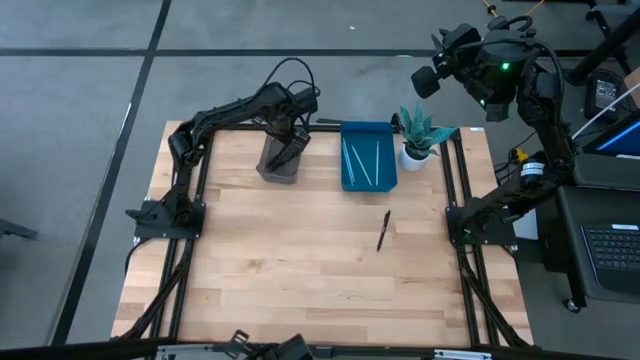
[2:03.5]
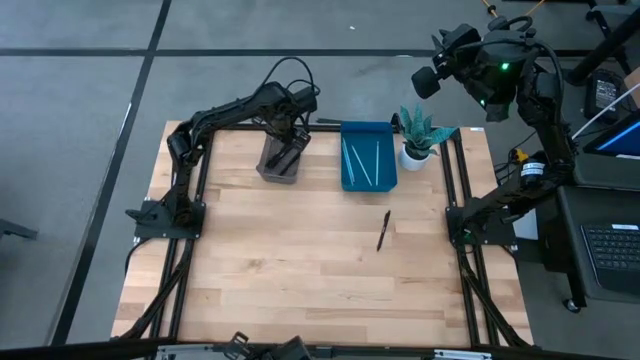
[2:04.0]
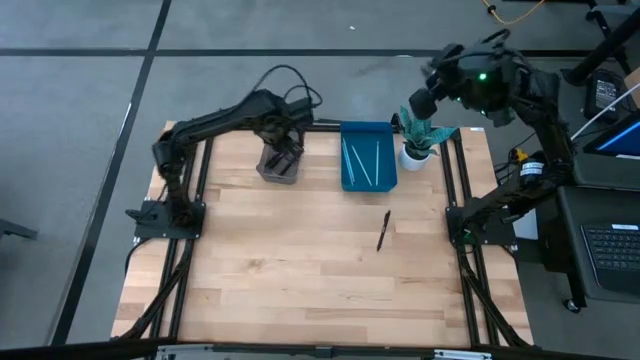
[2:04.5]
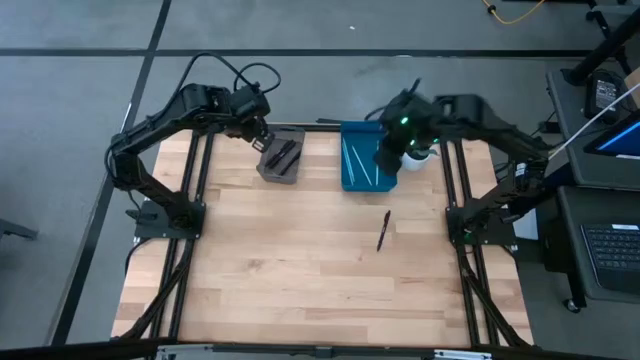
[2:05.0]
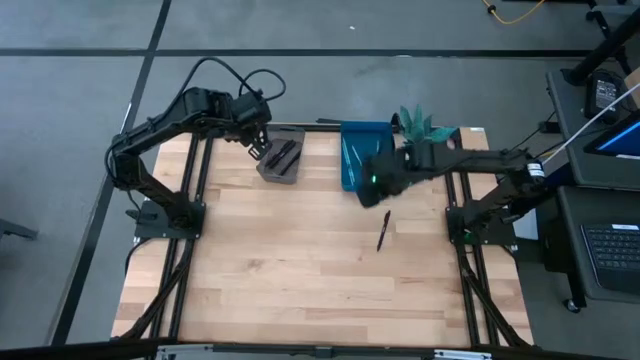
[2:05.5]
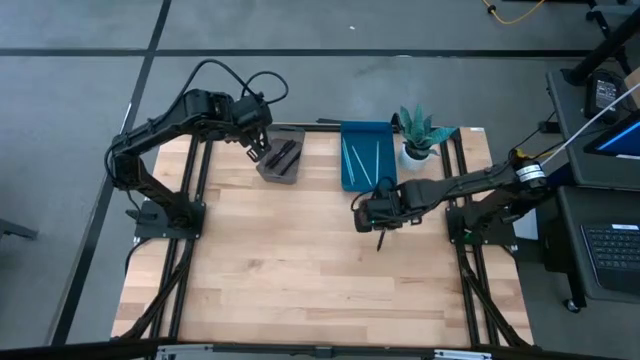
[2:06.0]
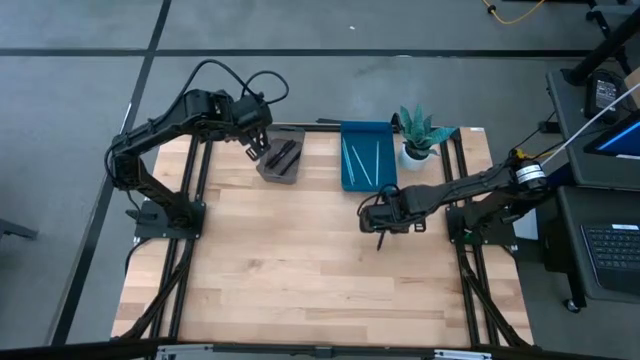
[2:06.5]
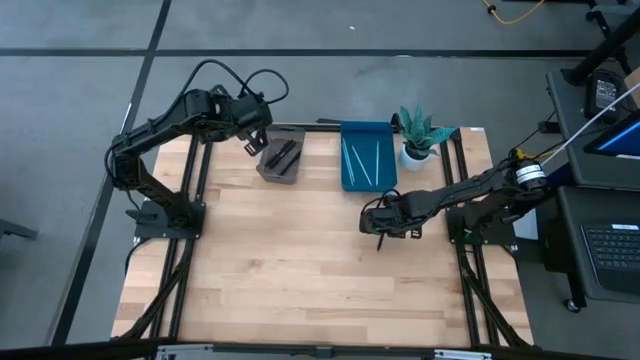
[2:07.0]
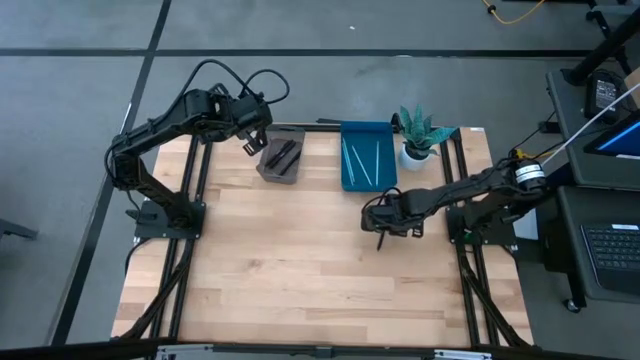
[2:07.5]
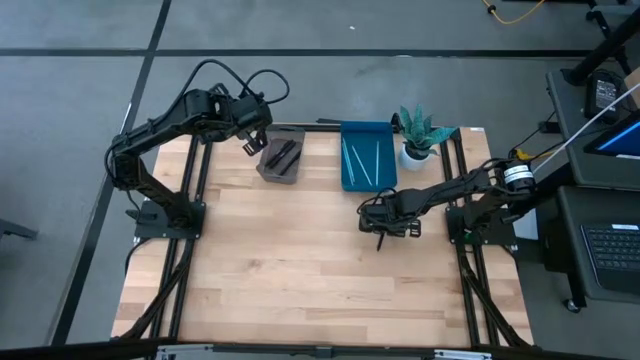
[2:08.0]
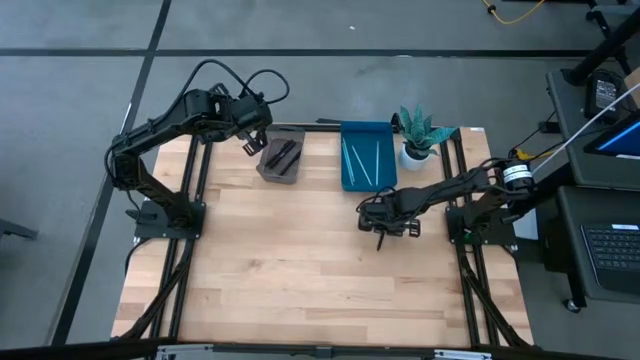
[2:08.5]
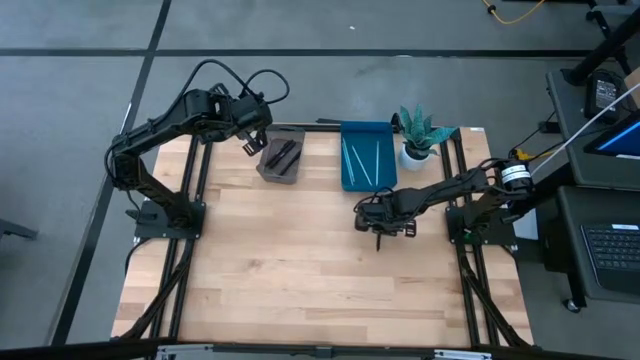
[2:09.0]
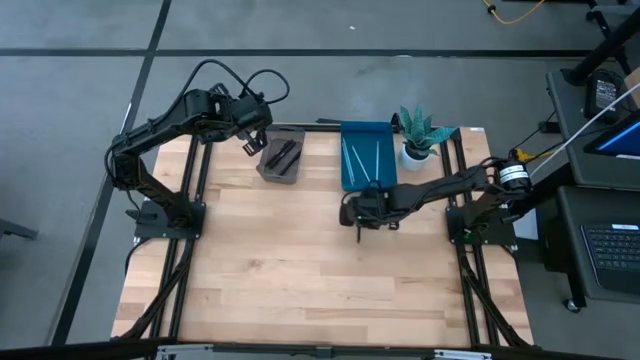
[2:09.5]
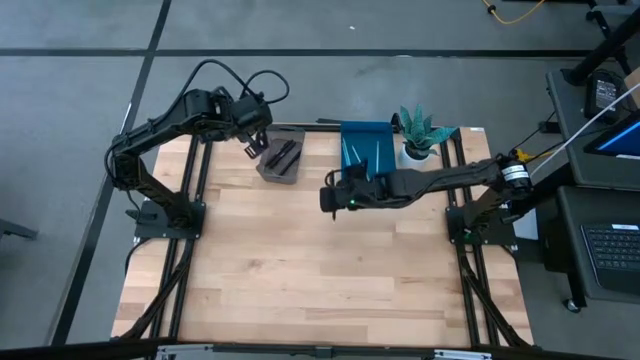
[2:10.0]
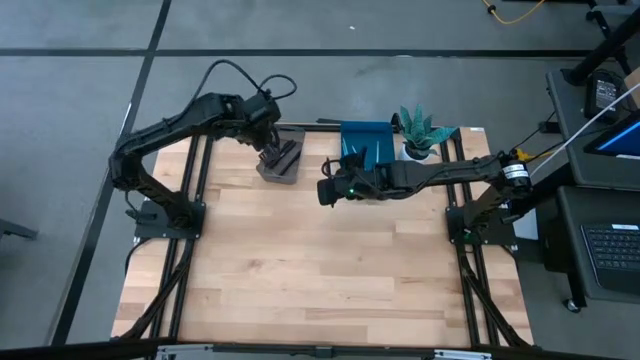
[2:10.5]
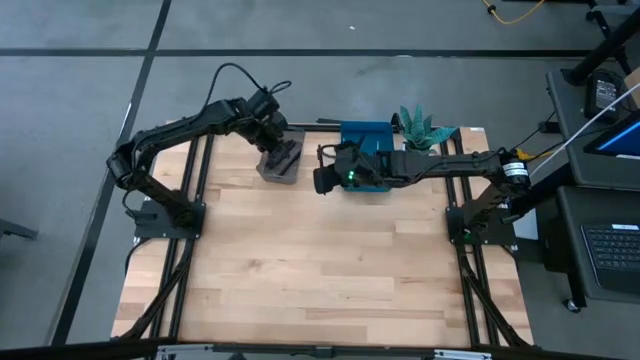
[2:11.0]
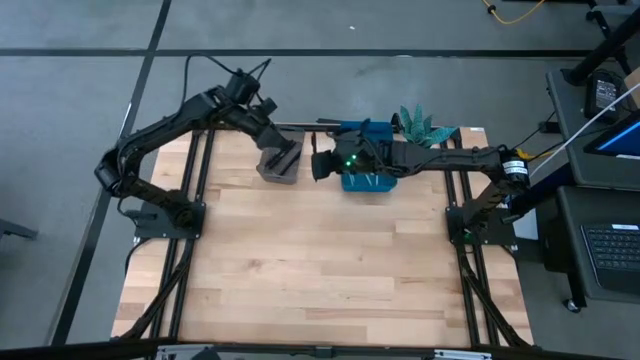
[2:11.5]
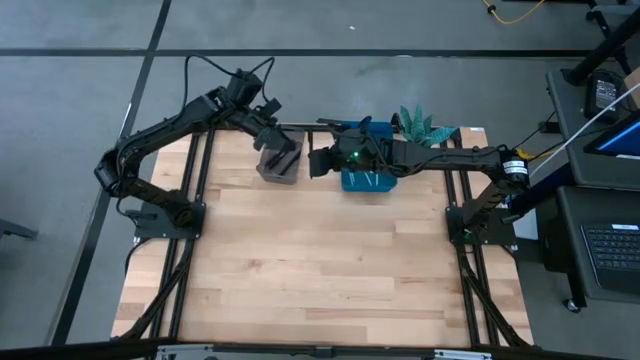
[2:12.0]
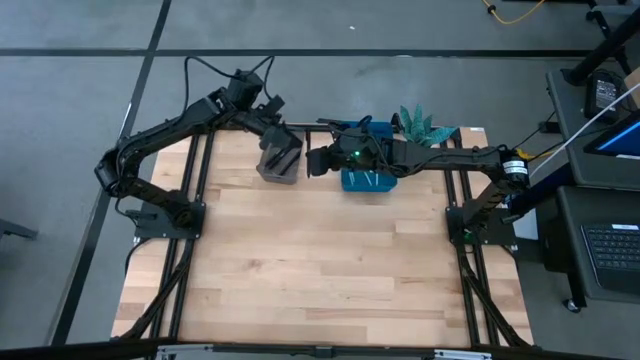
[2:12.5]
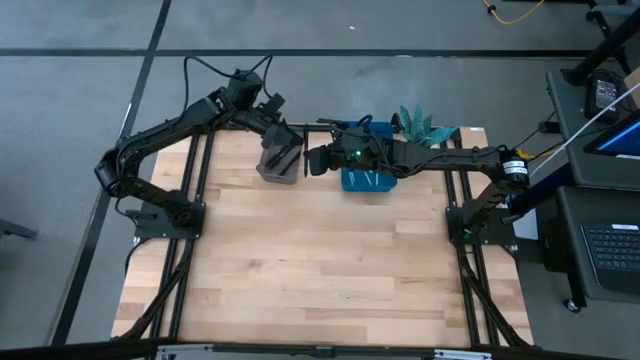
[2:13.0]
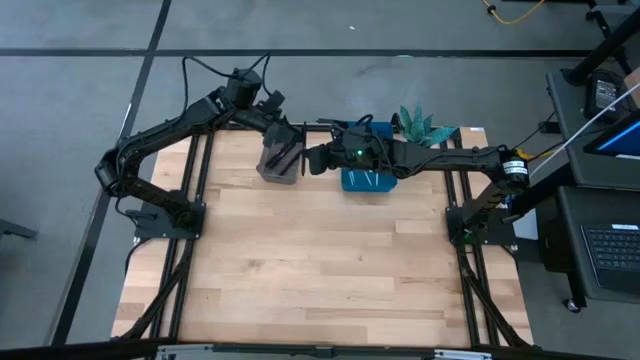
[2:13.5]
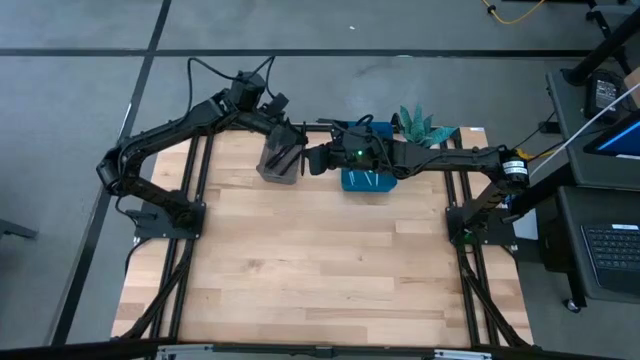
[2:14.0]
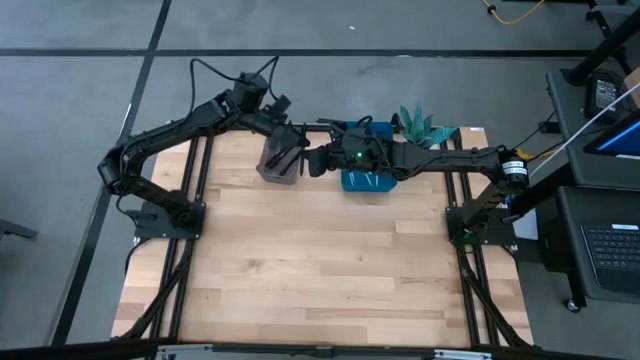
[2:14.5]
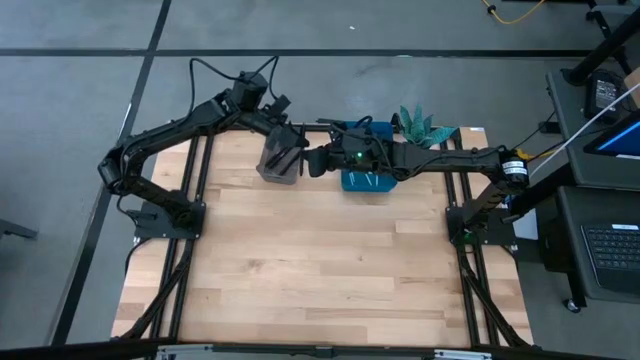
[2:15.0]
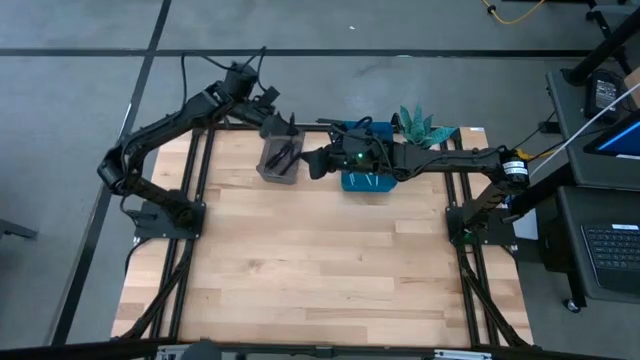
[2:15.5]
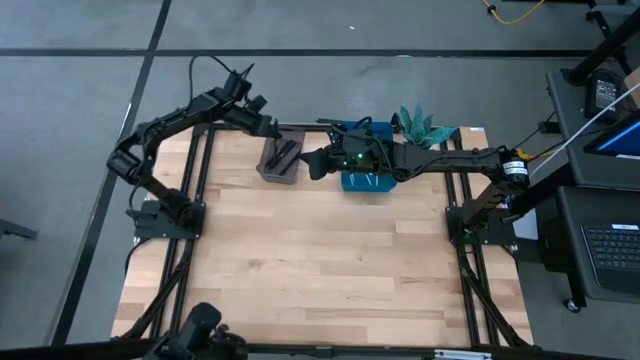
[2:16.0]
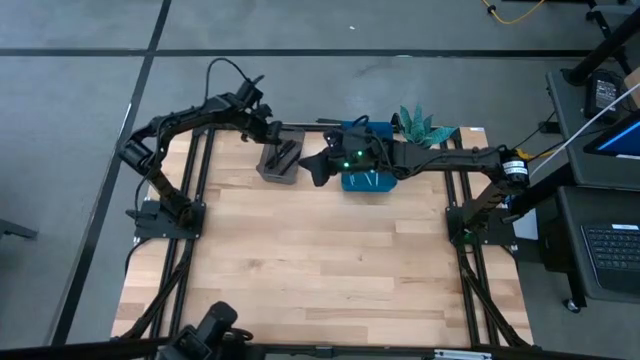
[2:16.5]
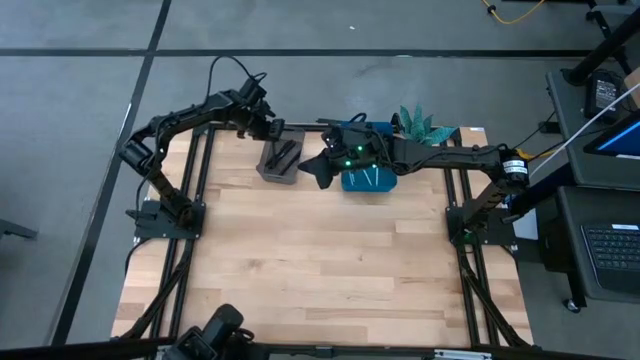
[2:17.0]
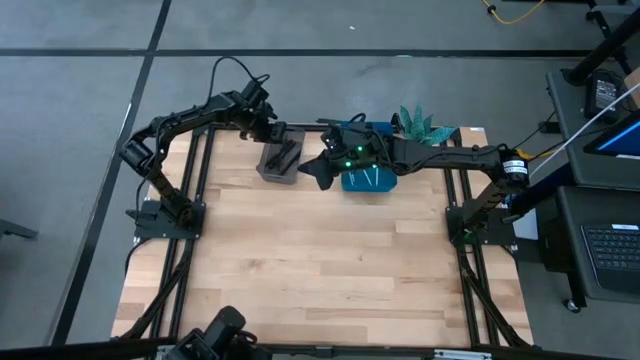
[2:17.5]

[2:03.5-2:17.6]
Task: Sort pens & pencils
Put the black pen into the gray bin

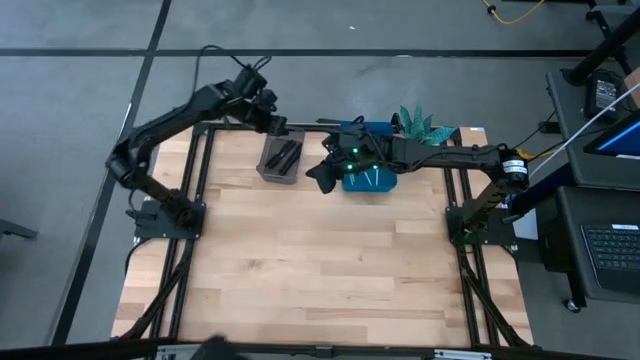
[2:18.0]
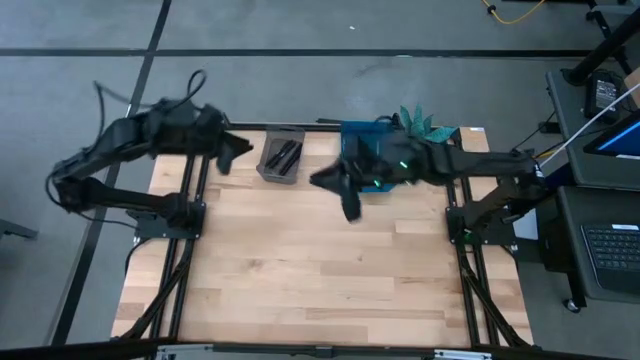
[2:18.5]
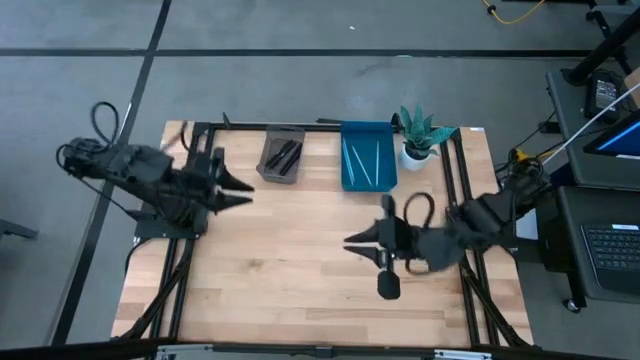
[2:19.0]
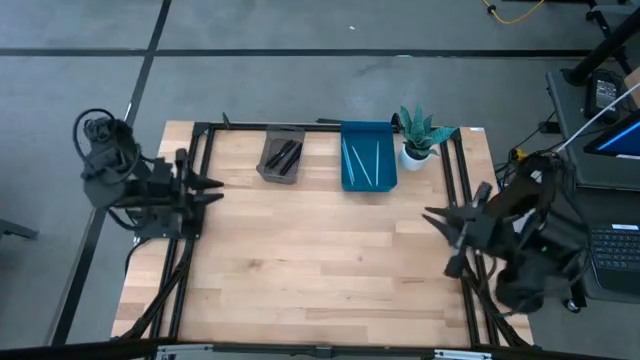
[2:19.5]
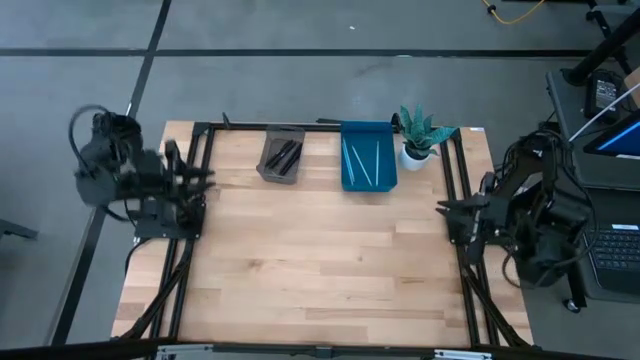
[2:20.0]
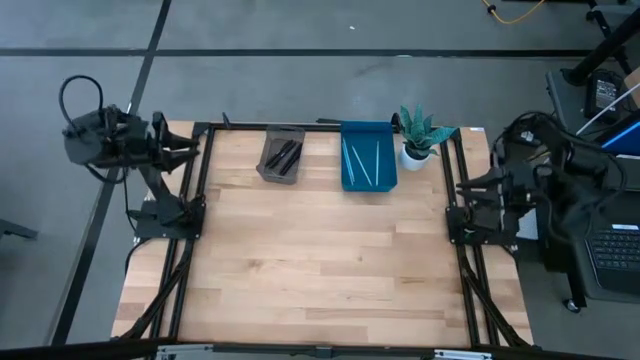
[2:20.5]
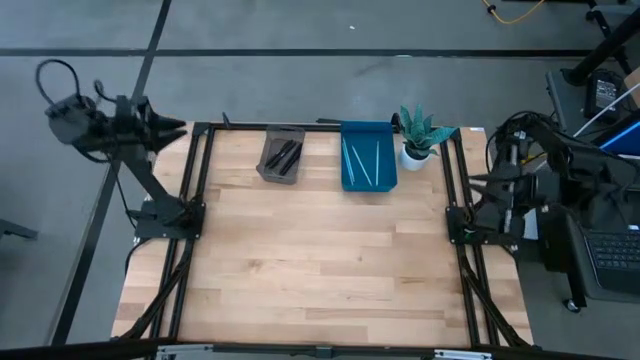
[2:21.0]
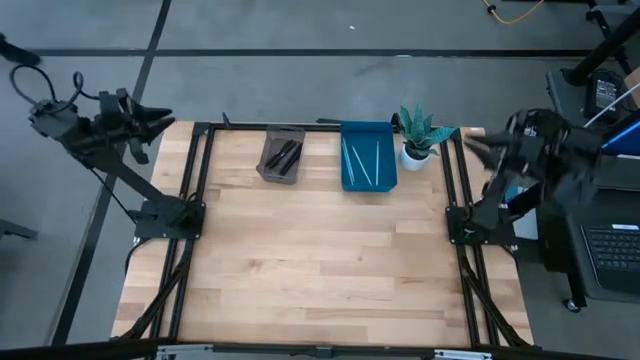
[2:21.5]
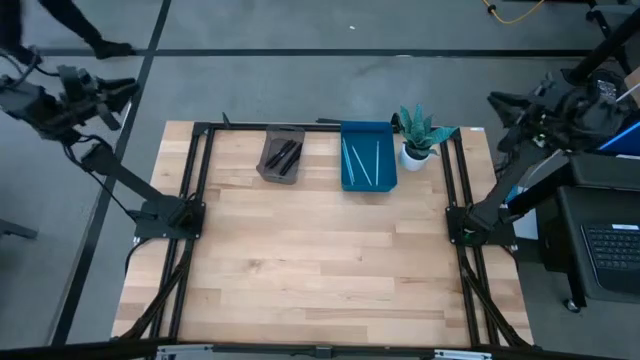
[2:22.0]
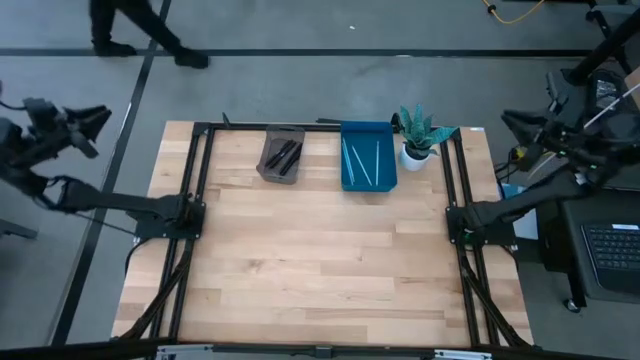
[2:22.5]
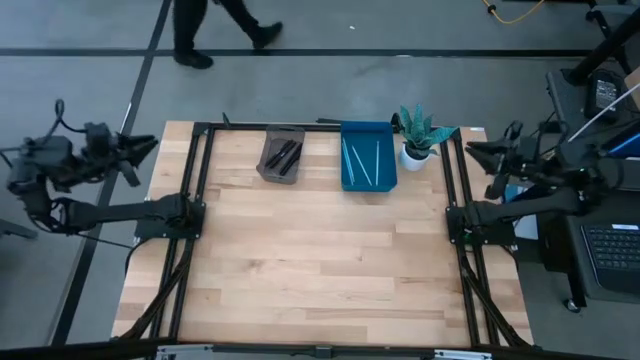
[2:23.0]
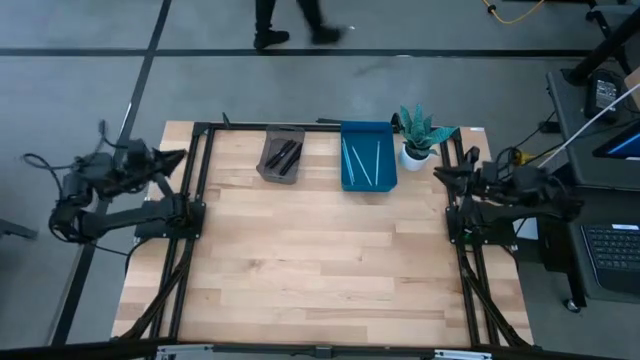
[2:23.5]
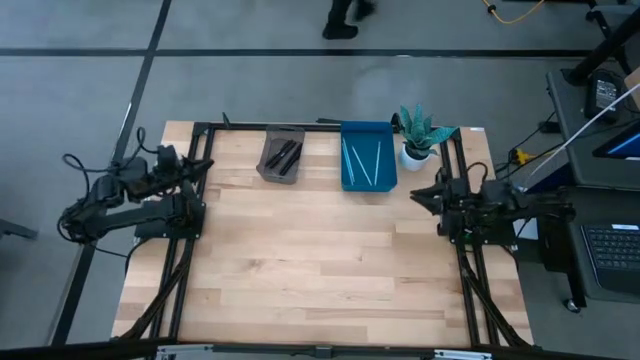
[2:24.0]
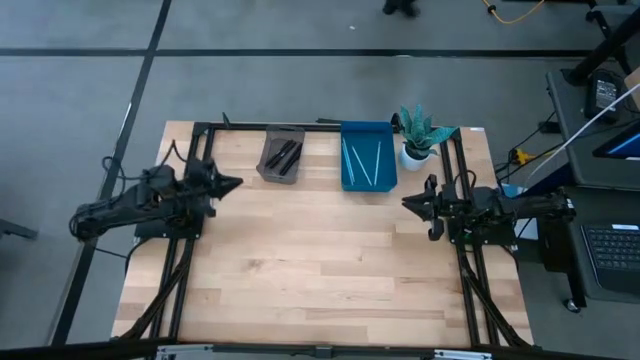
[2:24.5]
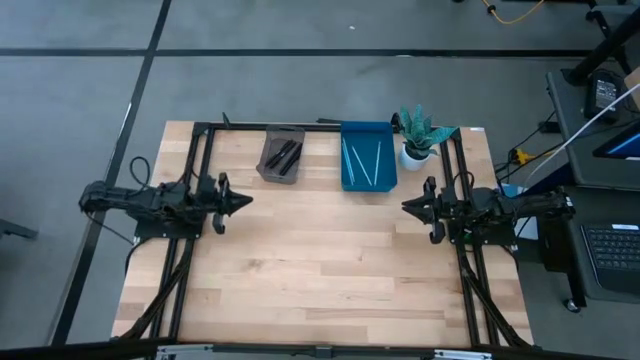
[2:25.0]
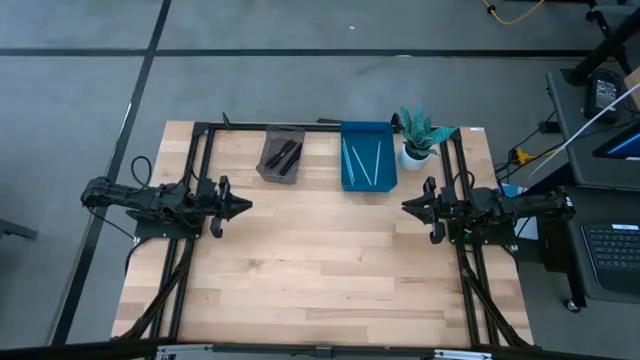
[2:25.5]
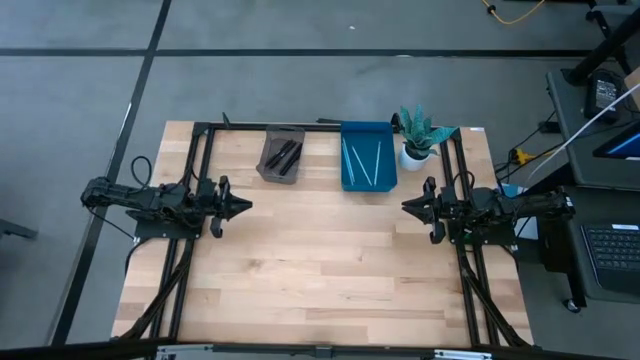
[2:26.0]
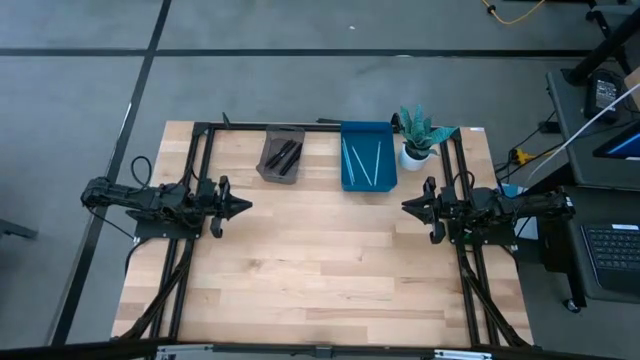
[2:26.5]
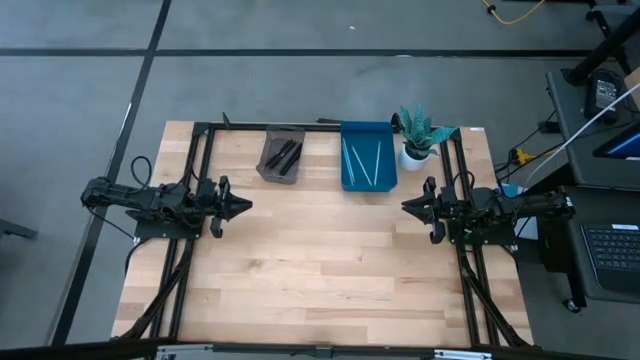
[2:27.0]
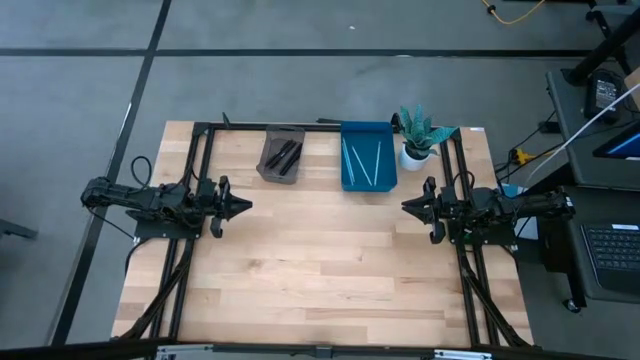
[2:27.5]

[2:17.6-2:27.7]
Return to Home Position
